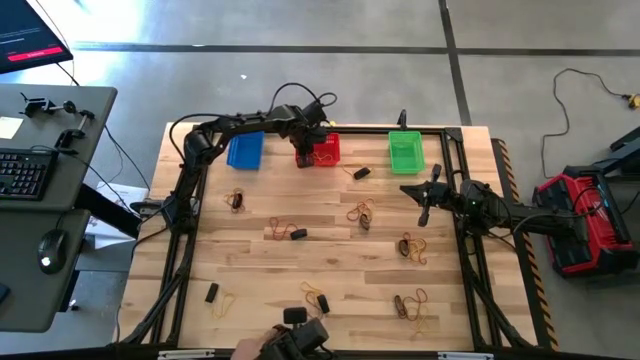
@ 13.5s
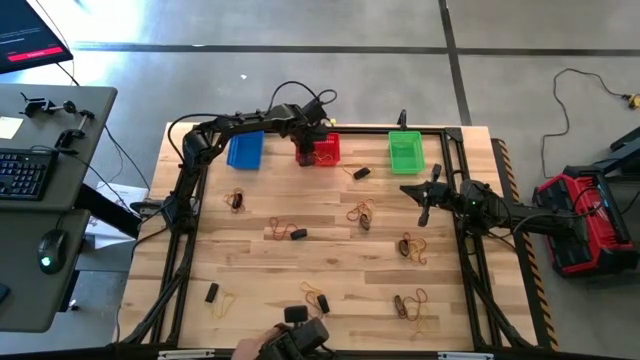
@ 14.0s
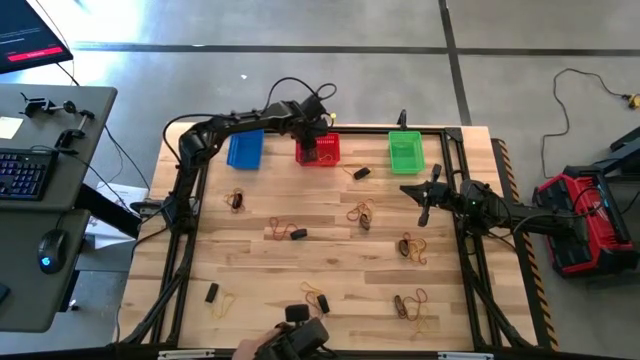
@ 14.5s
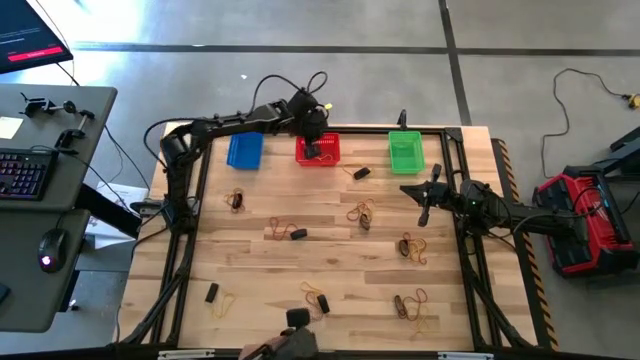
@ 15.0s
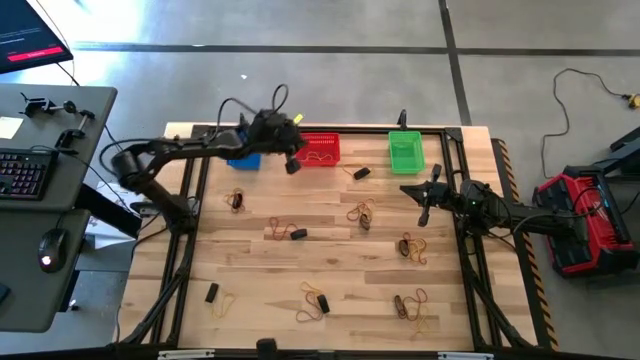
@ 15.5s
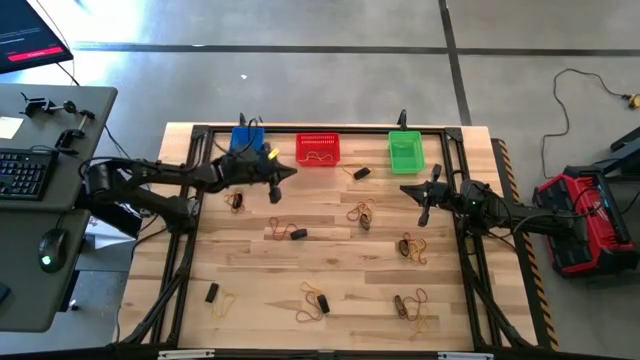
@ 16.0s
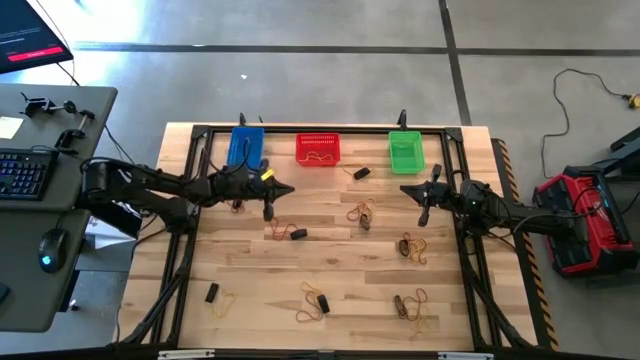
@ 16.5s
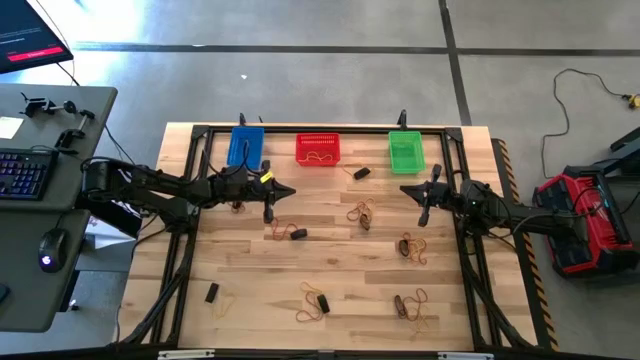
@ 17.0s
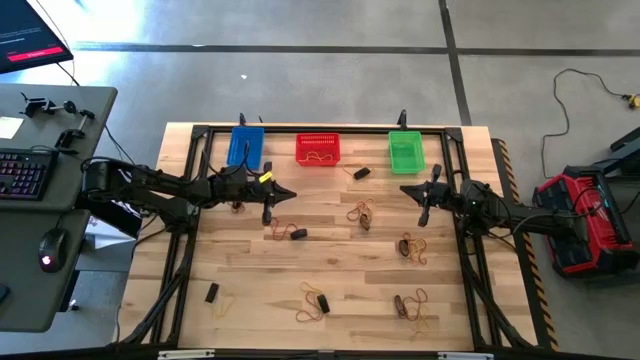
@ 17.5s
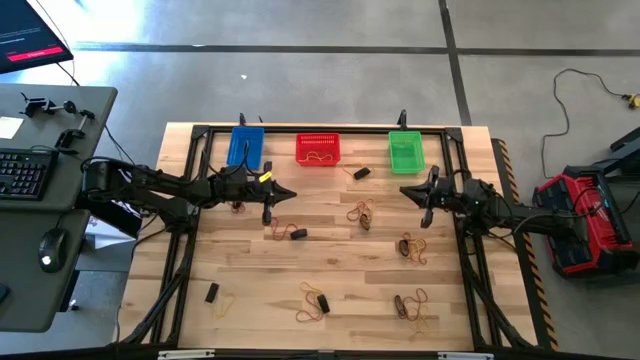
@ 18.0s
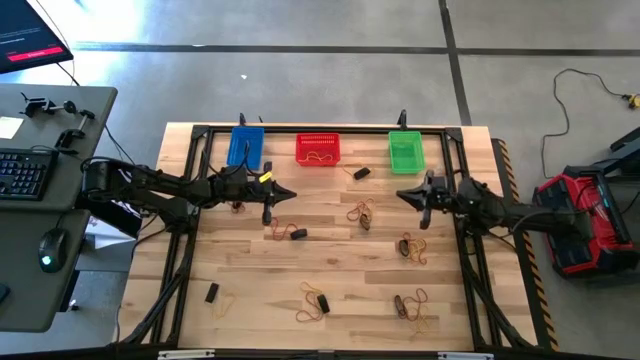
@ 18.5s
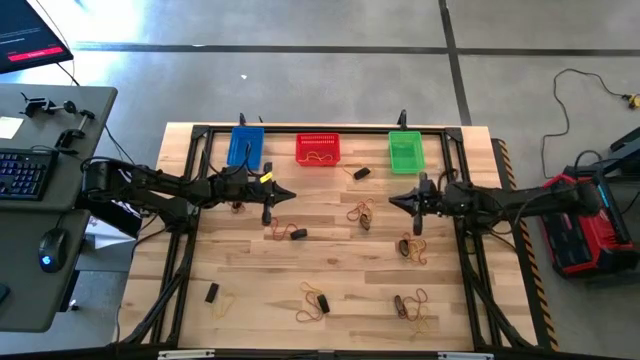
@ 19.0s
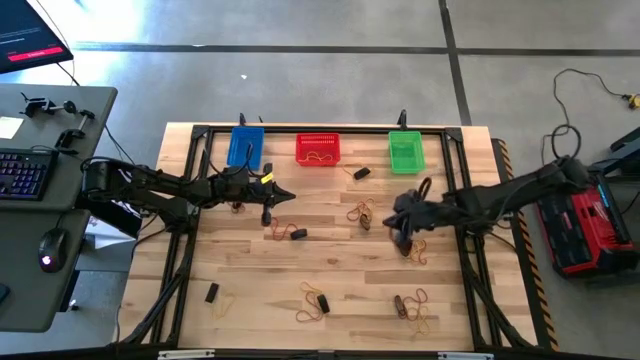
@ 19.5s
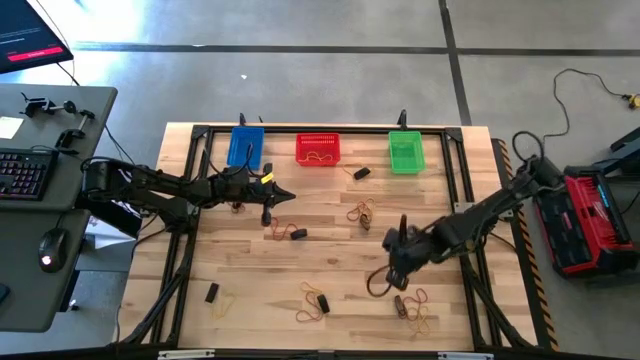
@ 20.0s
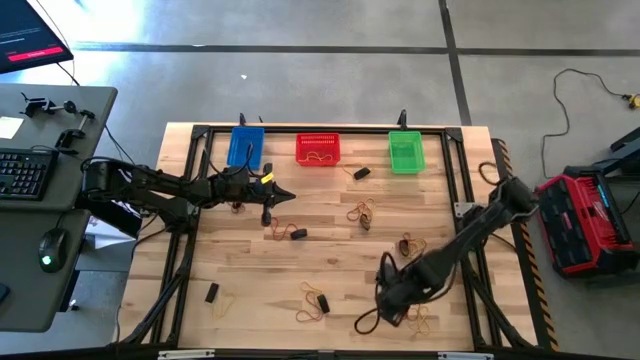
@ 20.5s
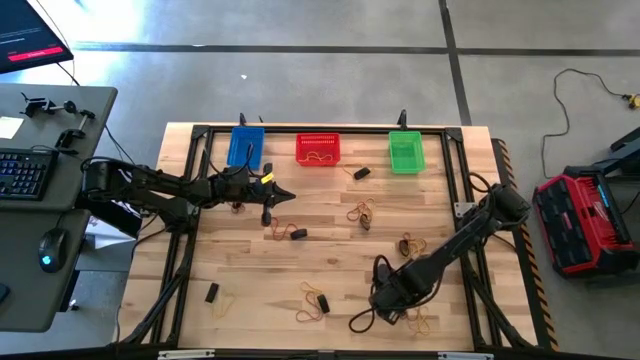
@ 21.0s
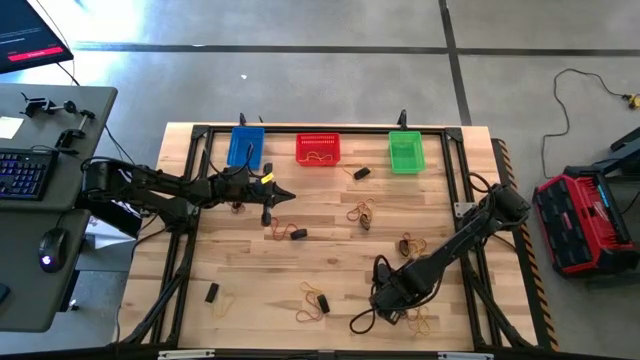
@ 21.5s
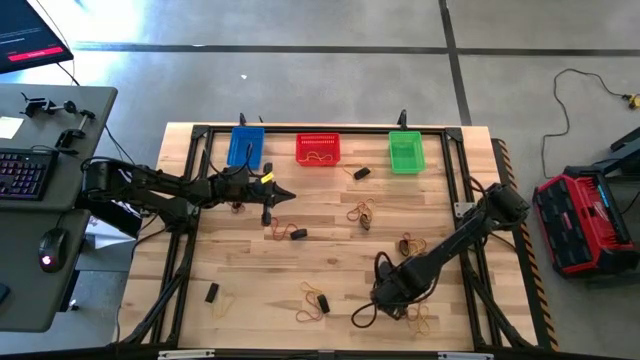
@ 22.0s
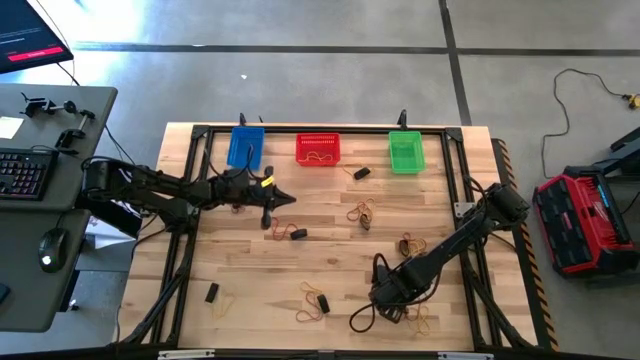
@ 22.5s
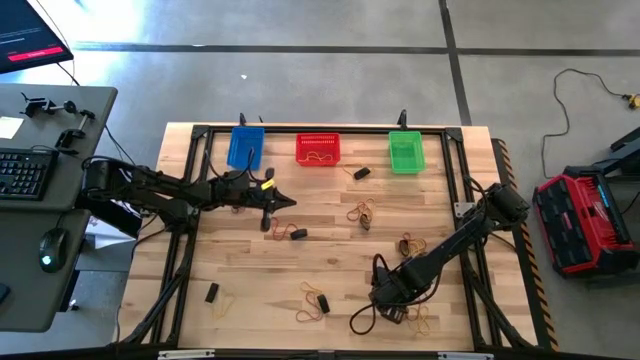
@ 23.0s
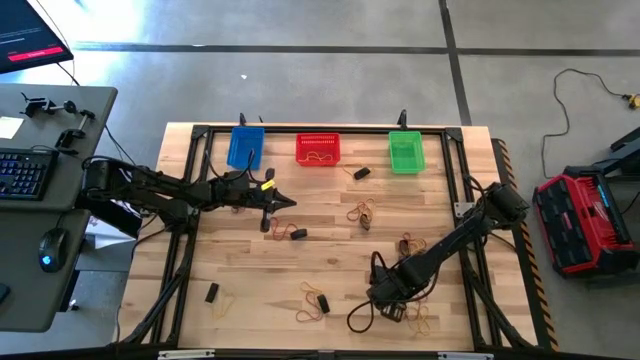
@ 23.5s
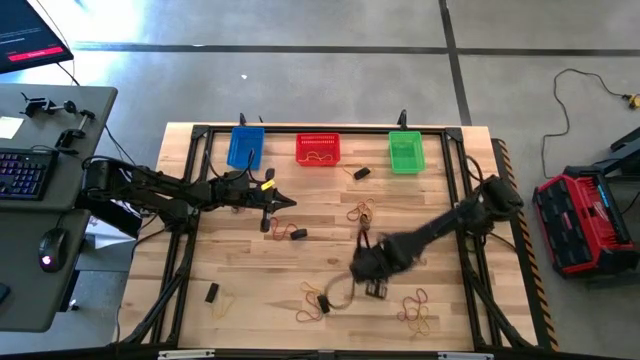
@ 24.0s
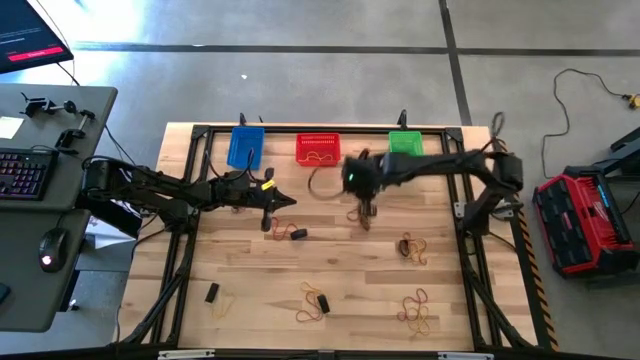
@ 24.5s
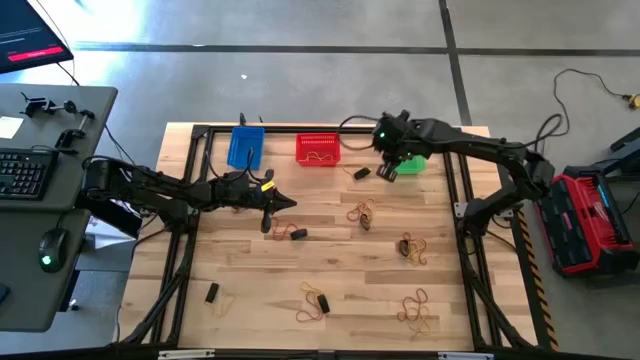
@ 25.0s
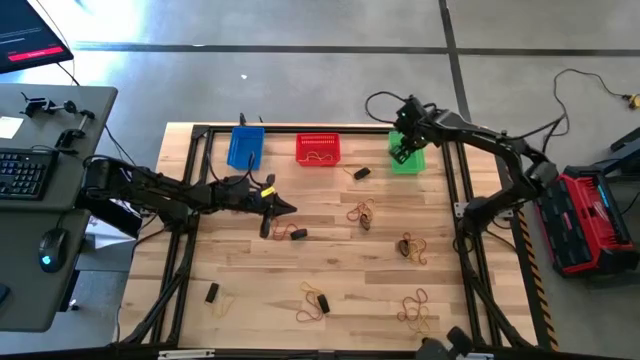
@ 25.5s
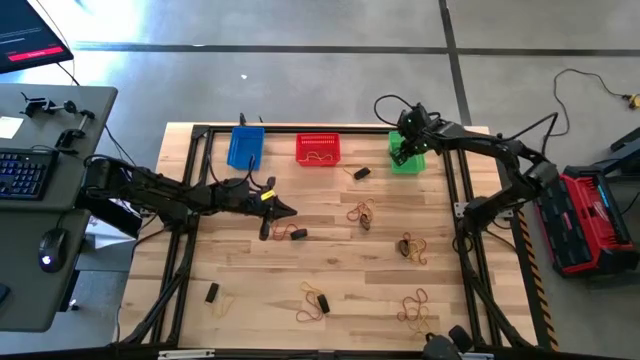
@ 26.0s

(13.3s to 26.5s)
Task: Sort rubber bands into baskets
Put the black rubberband into the green bin

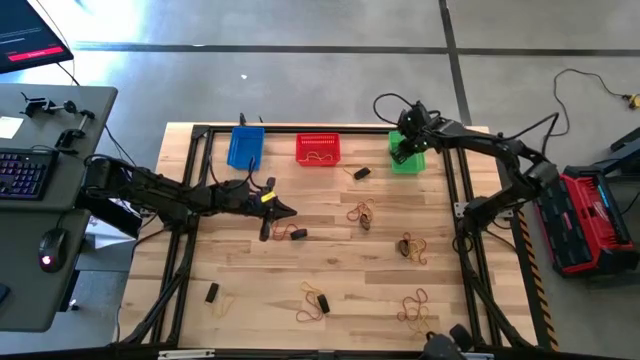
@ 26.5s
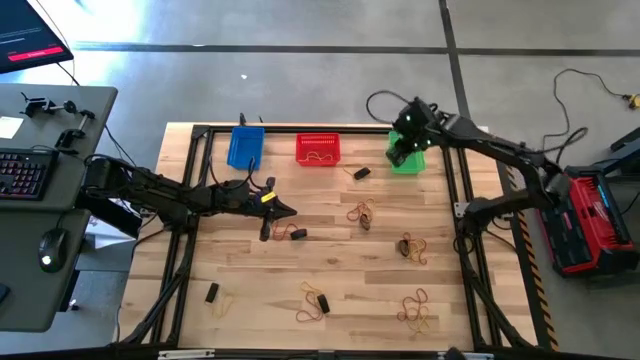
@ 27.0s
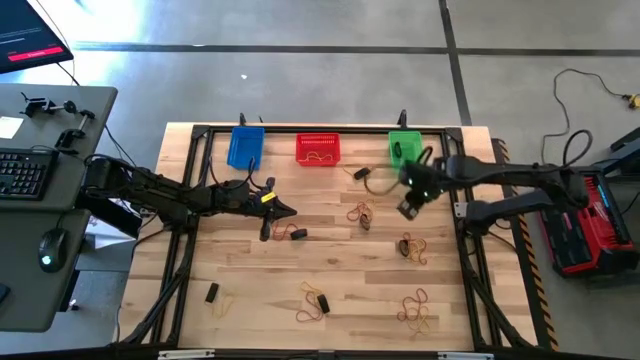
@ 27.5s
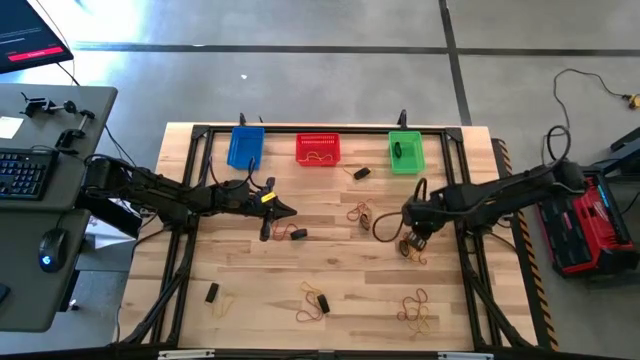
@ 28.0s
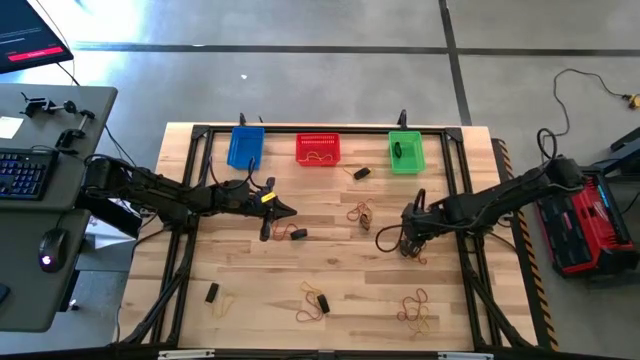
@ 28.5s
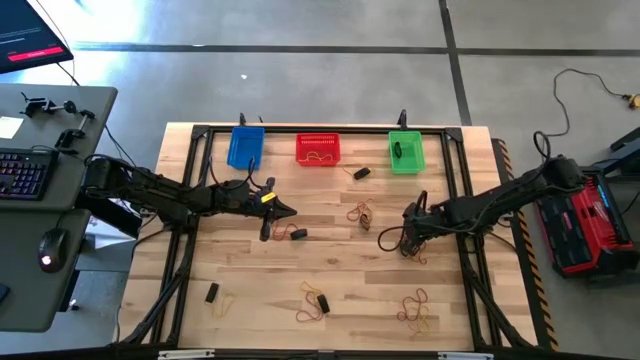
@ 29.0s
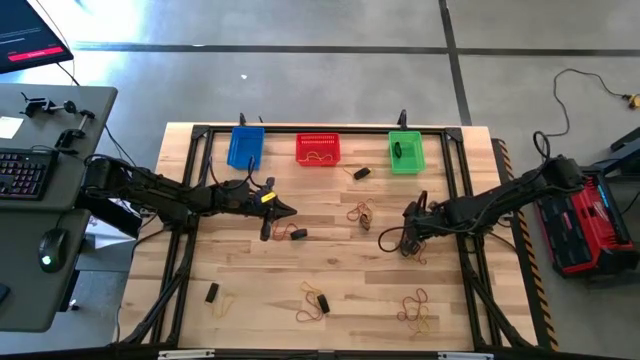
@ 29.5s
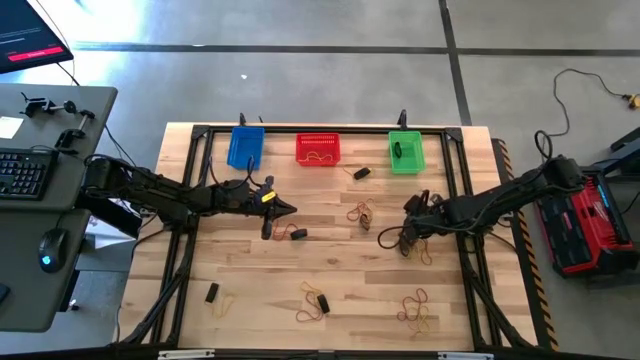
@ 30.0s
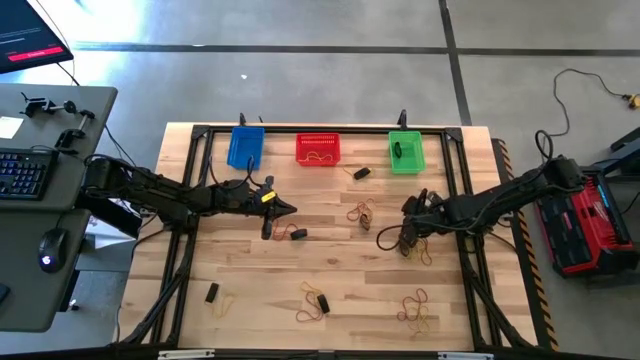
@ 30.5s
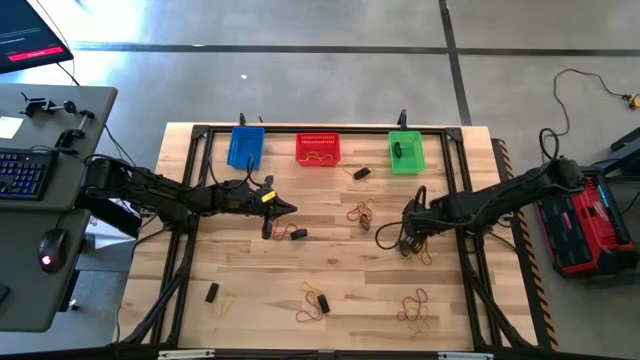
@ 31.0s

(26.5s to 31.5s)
Put the orange rubberband into the blue bin

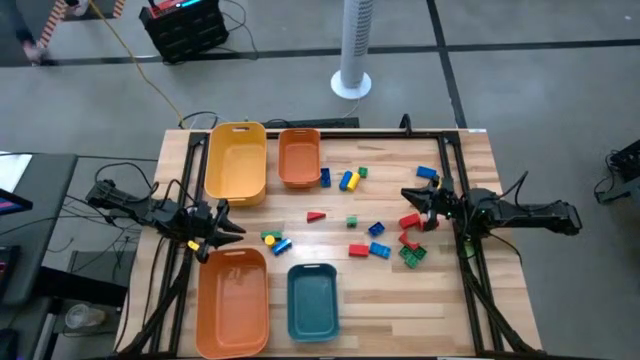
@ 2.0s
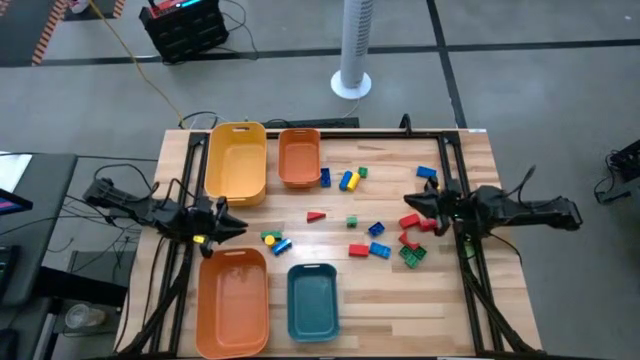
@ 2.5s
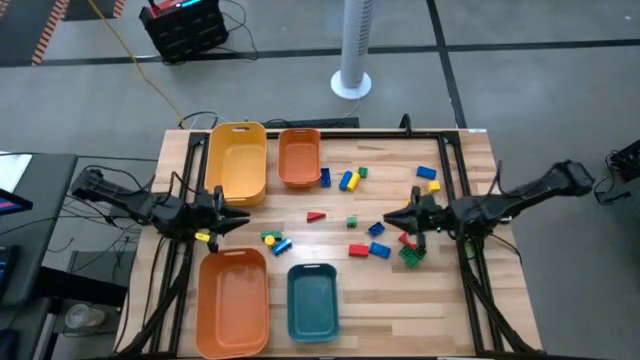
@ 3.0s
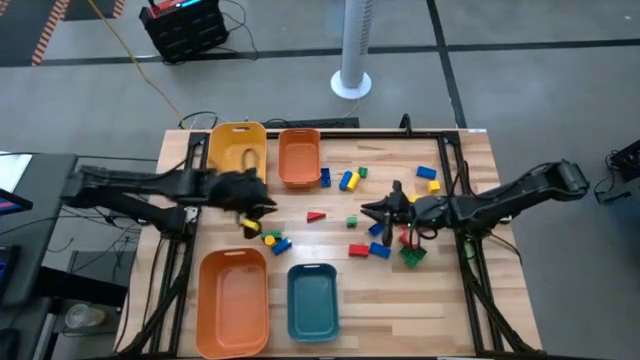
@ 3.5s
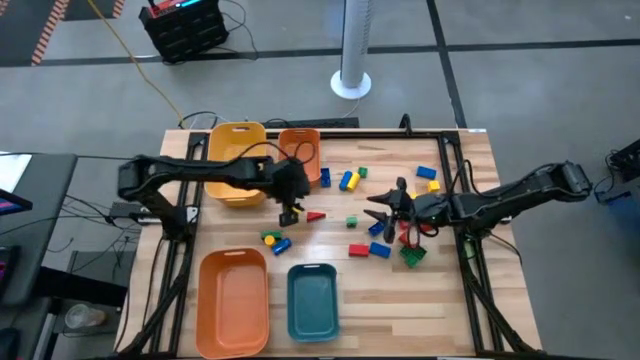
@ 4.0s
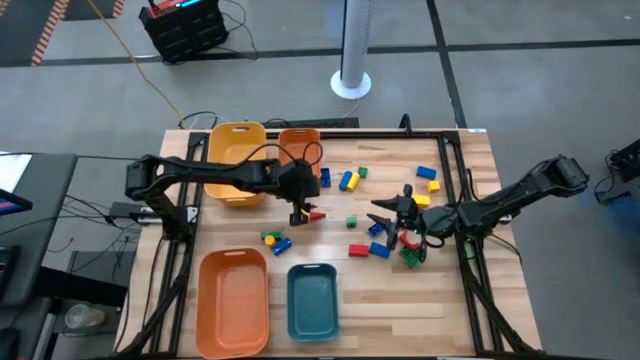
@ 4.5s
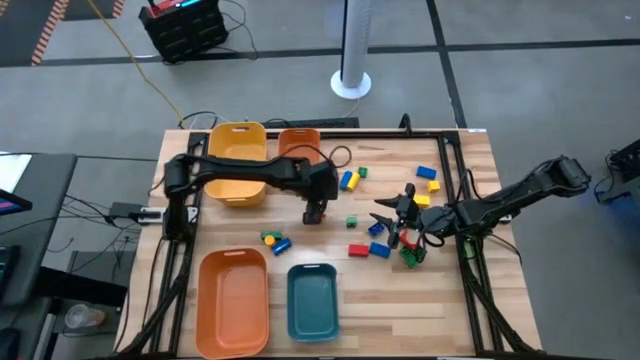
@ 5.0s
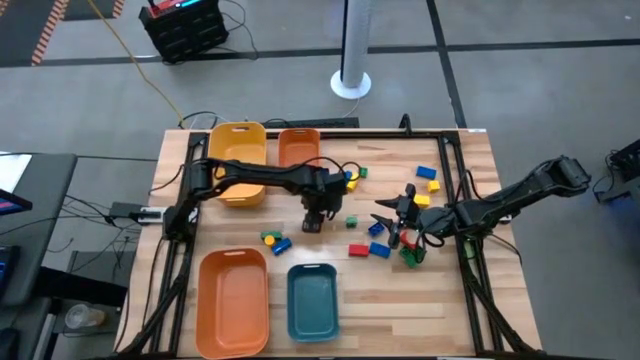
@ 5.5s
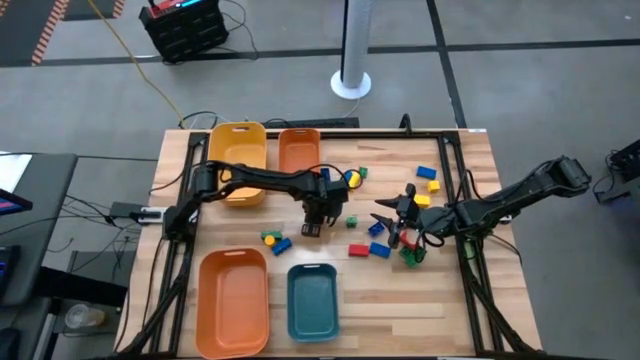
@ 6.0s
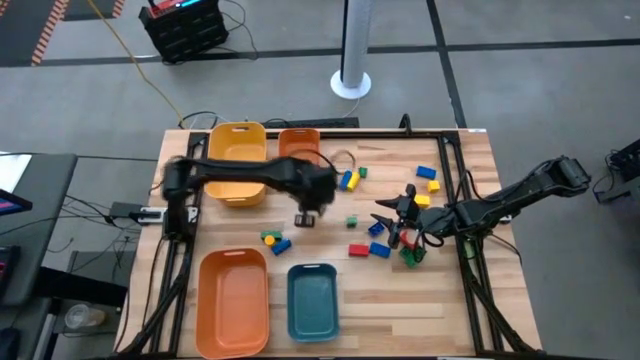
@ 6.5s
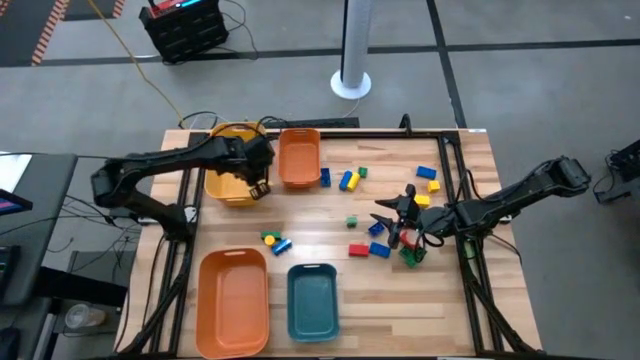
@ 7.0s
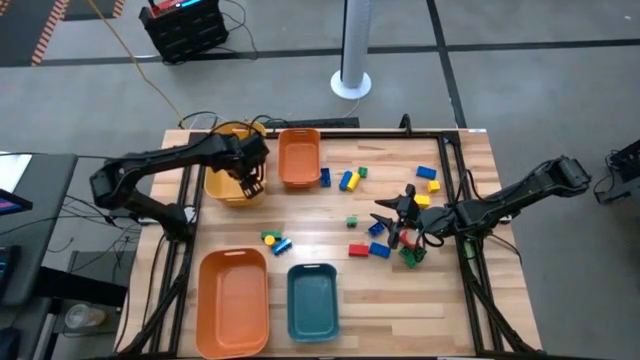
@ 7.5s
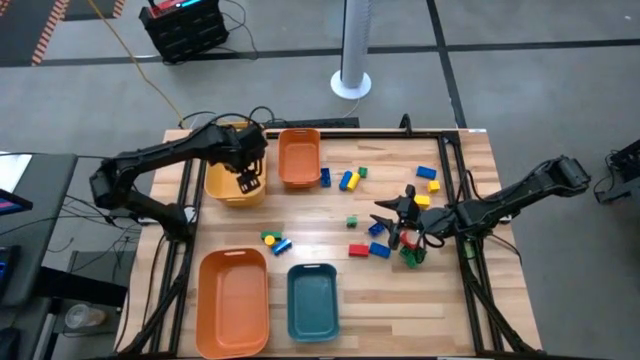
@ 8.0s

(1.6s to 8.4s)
Task: Sort blocks
Put the red wooden block into the yellow bin
